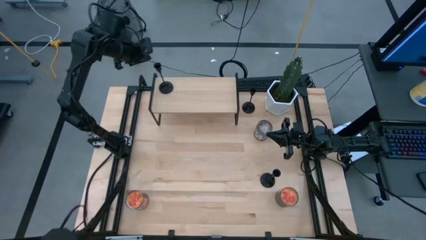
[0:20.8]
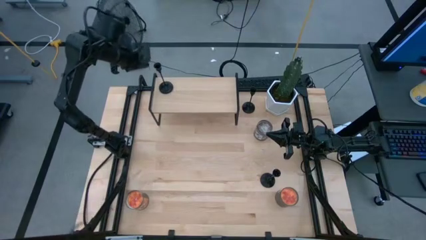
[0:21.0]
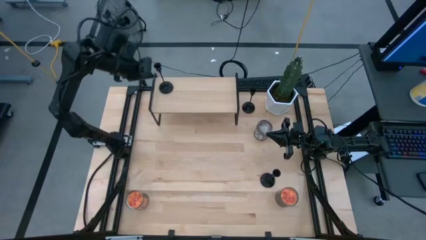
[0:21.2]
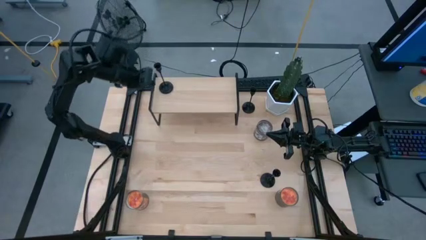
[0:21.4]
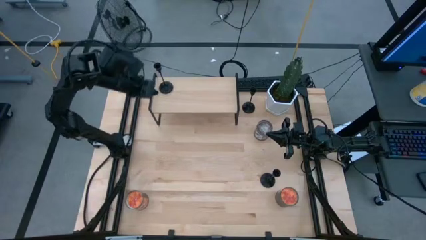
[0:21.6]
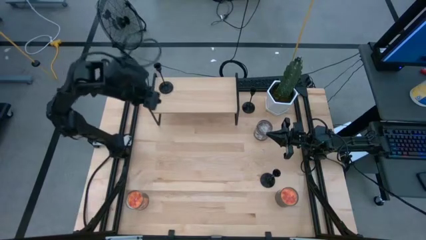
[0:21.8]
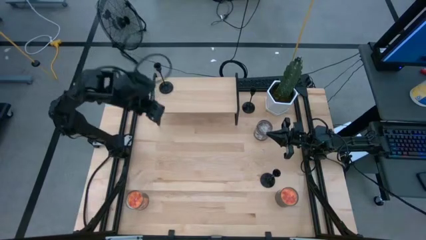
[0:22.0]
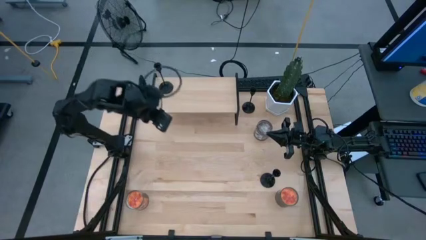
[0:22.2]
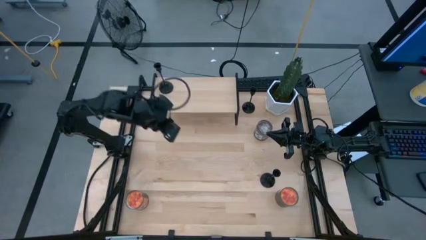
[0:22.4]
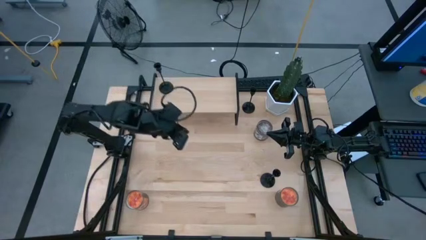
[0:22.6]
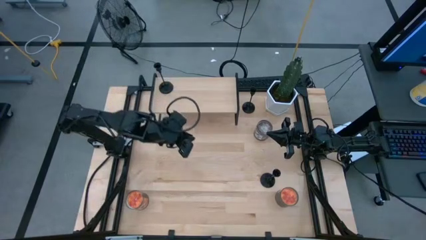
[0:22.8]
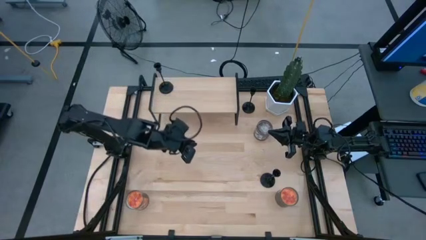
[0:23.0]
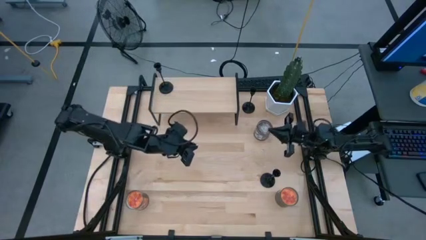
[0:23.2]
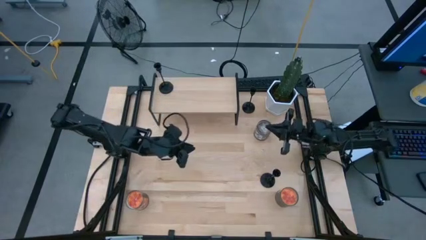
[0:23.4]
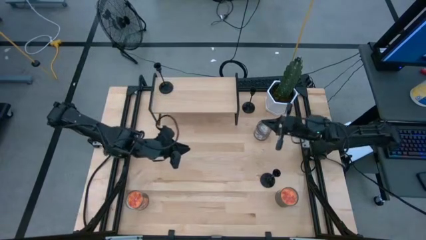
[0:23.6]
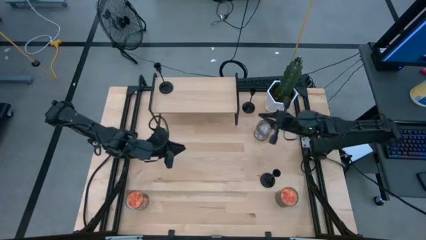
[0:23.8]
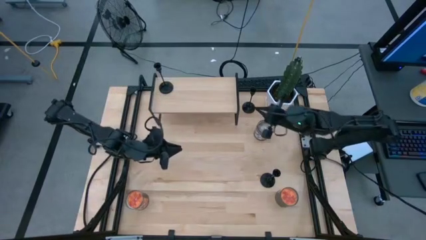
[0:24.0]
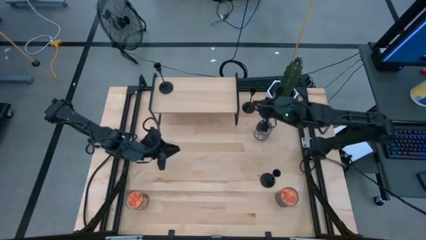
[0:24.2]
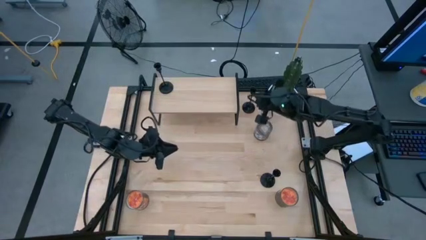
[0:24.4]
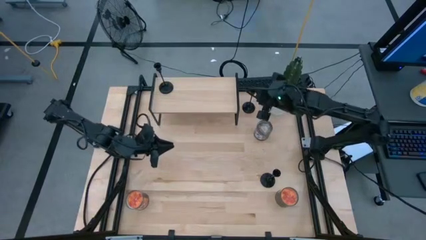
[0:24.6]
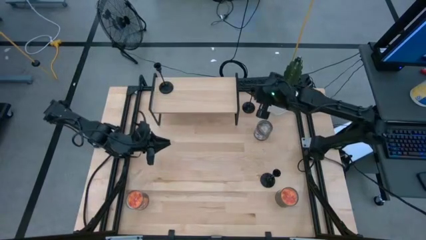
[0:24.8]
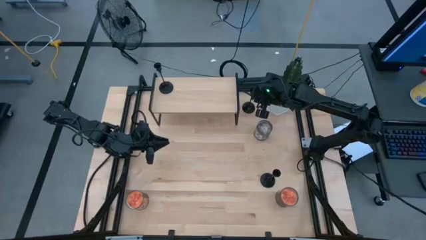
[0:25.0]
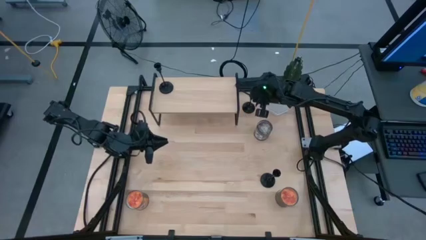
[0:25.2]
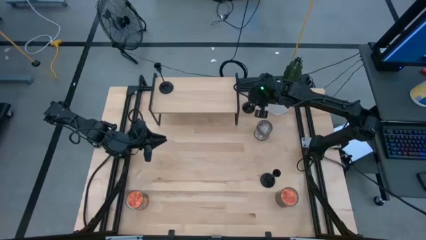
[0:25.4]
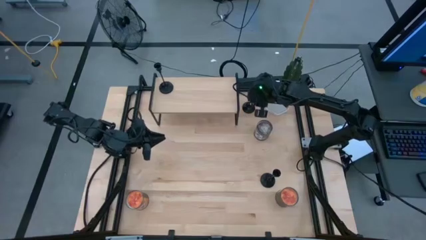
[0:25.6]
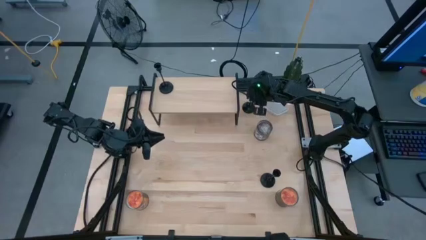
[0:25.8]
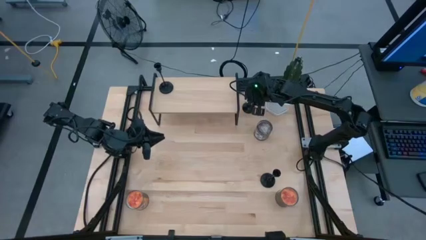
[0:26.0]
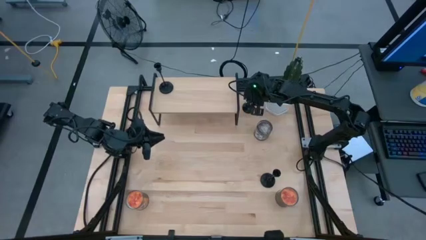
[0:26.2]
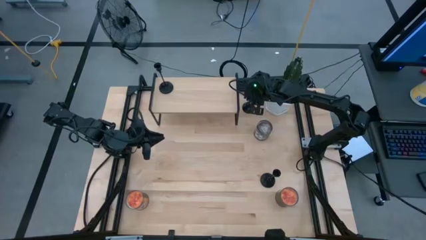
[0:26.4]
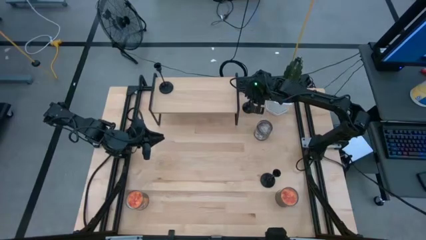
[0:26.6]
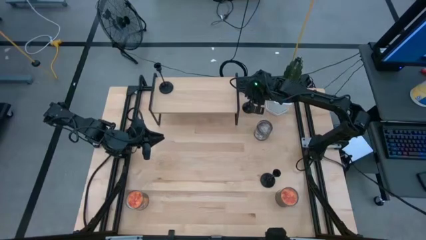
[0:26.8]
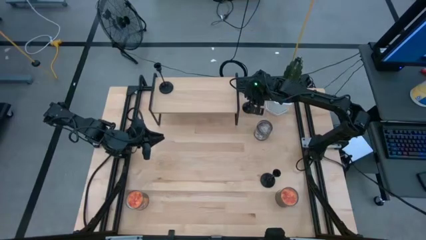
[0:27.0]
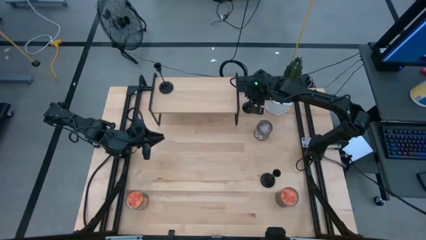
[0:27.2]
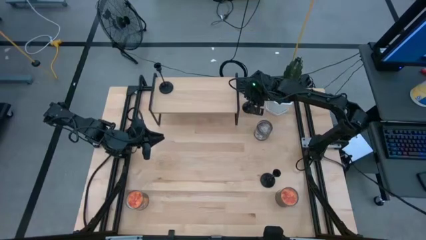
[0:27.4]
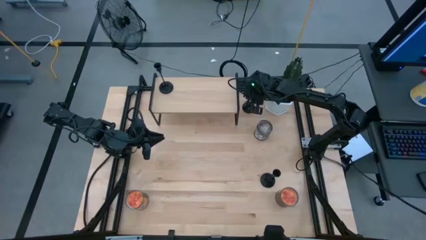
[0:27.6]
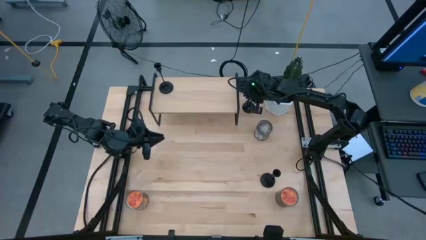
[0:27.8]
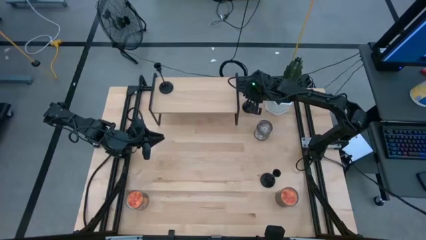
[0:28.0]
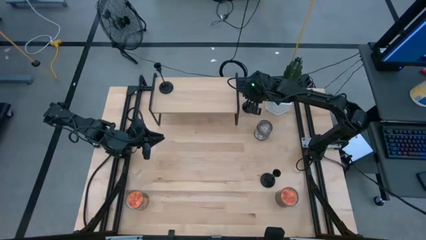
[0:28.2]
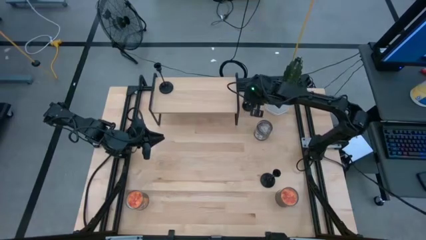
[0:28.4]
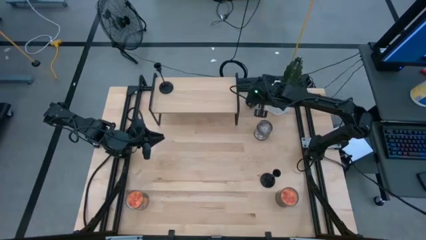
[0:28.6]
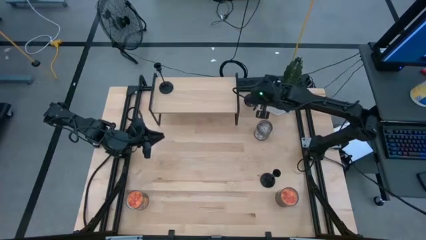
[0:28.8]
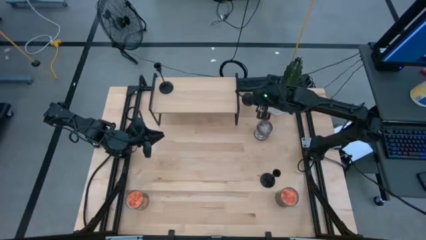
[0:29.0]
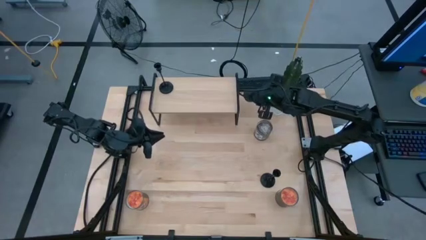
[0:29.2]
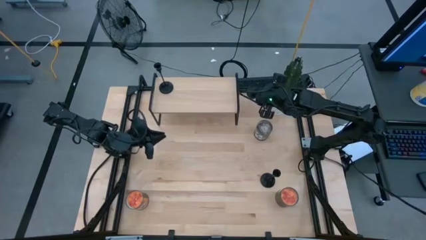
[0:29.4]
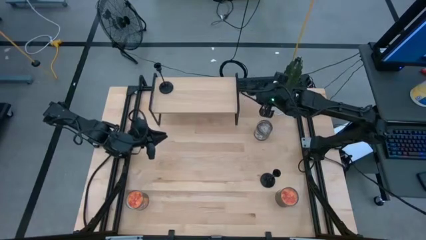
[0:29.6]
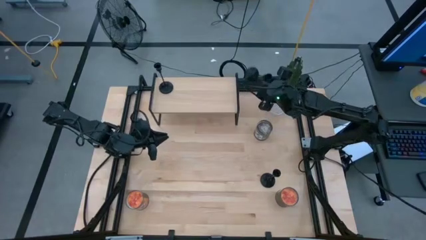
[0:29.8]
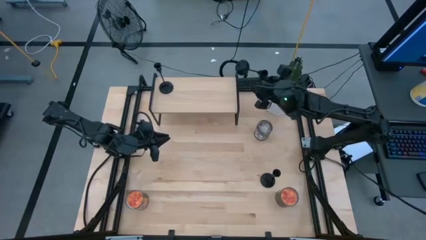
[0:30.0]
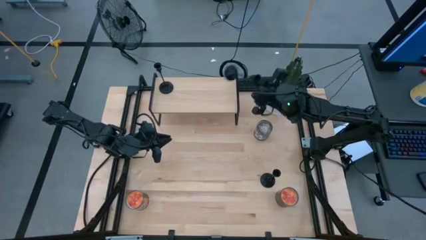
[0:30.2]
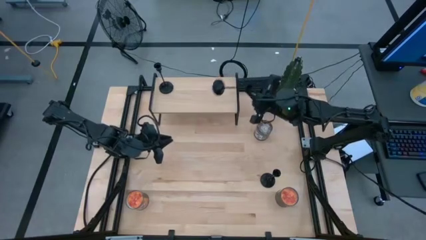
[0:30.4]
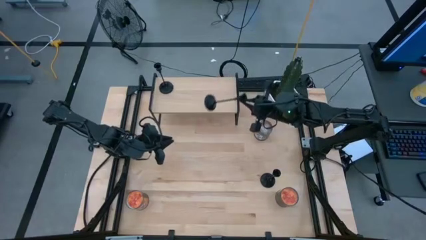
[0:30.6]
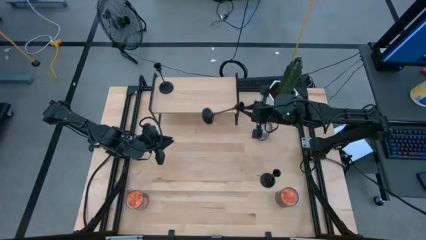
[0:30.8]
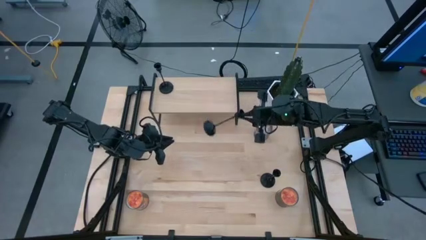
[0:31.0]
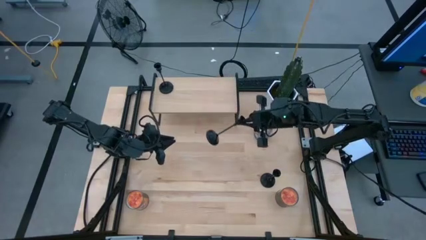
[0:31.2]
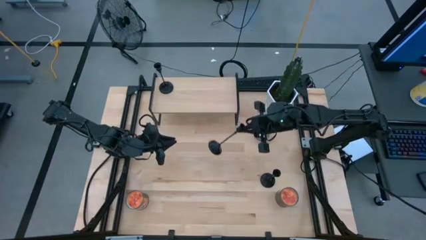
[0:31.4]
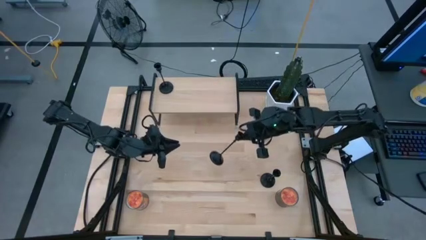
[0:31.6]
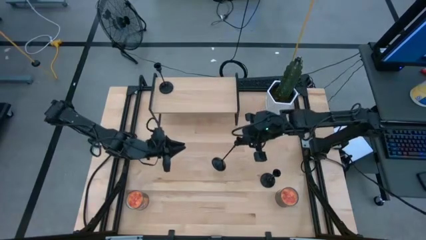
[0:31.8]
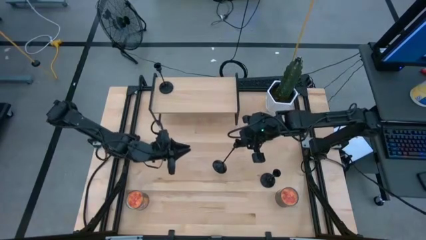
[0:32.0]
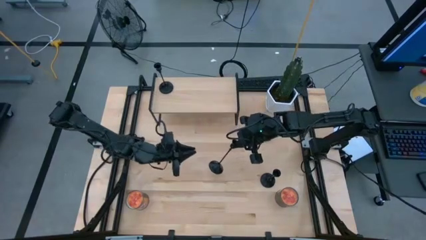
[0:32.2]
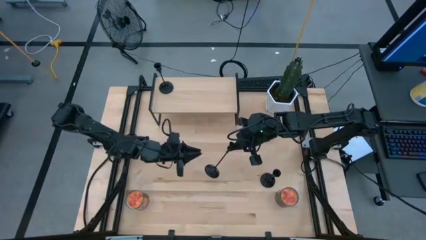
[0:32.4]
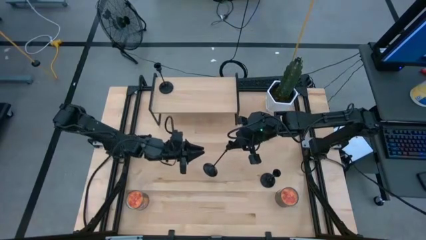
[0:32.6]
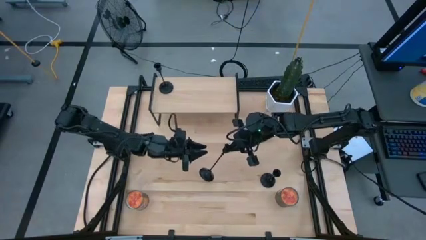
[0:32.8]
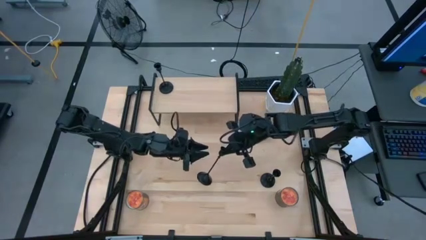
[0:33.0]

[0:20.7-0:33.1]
Task: Pick & Place candle stick holders
Put the top black candle holder on the shelf
